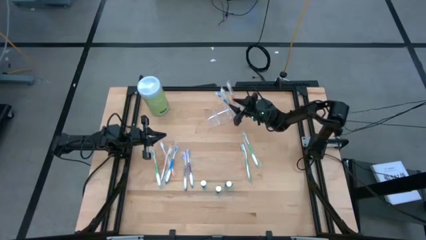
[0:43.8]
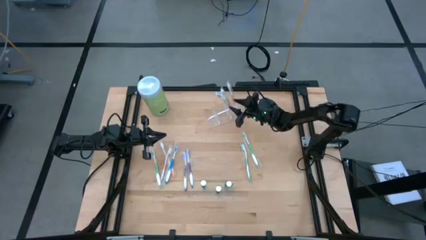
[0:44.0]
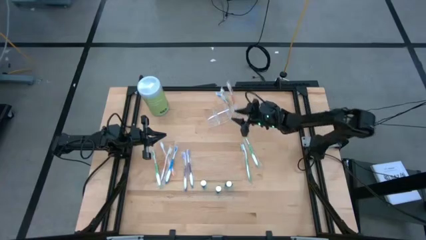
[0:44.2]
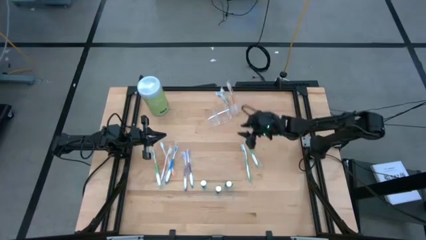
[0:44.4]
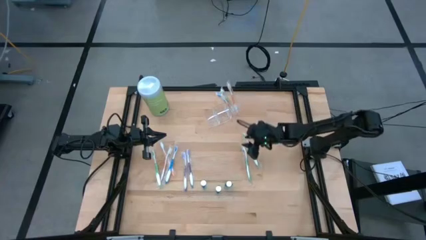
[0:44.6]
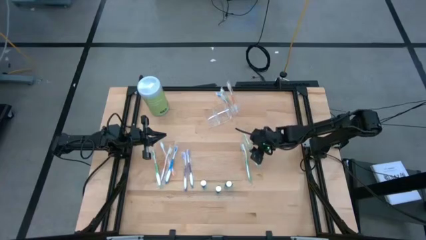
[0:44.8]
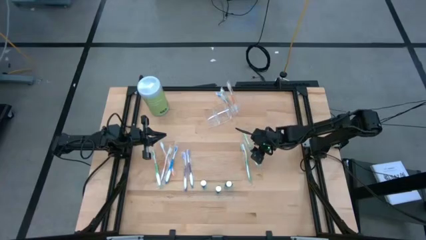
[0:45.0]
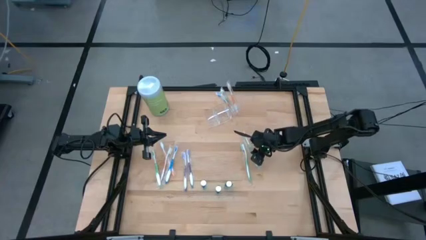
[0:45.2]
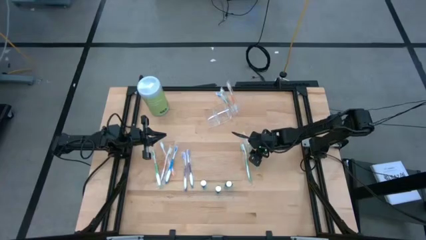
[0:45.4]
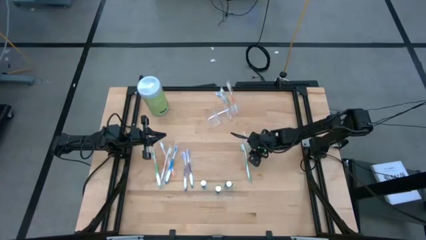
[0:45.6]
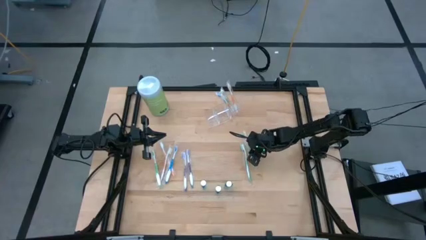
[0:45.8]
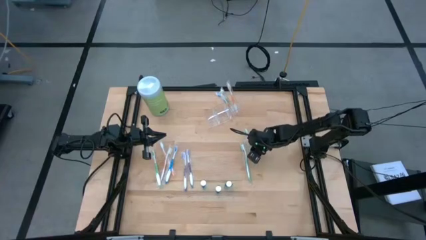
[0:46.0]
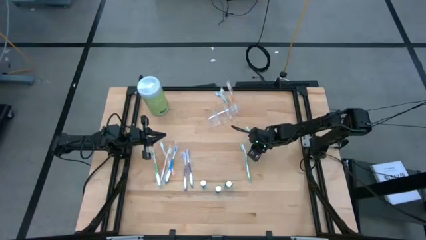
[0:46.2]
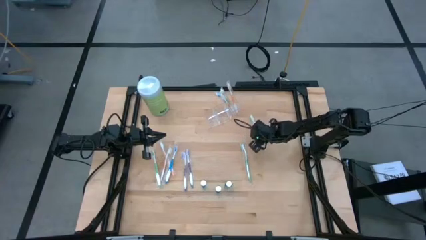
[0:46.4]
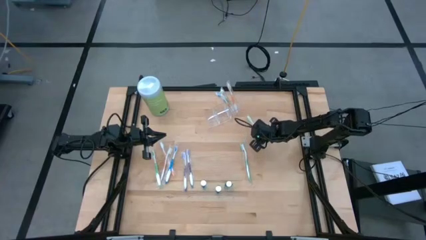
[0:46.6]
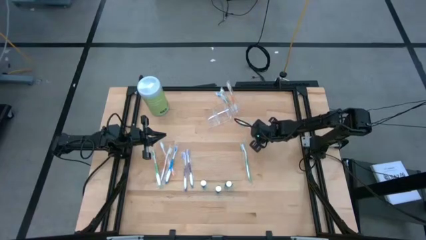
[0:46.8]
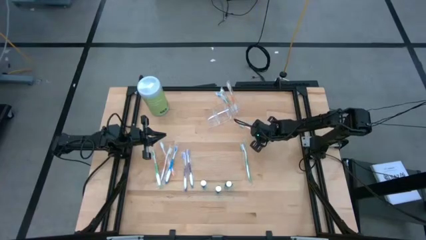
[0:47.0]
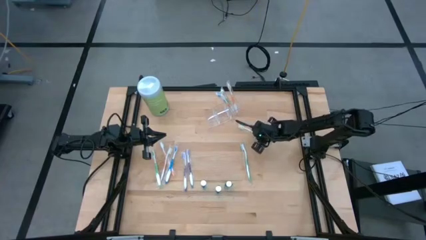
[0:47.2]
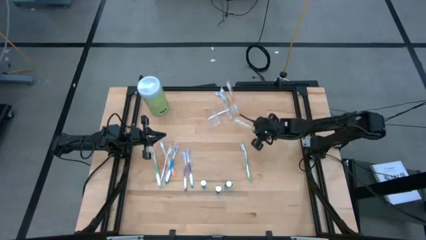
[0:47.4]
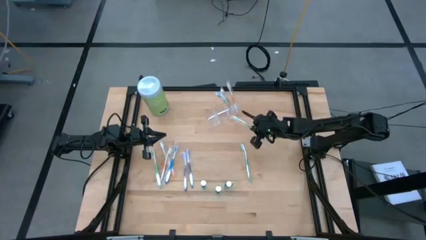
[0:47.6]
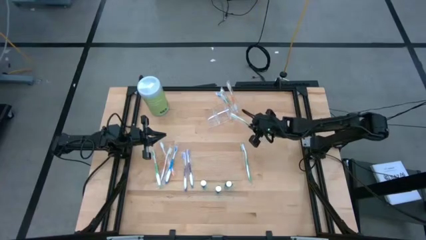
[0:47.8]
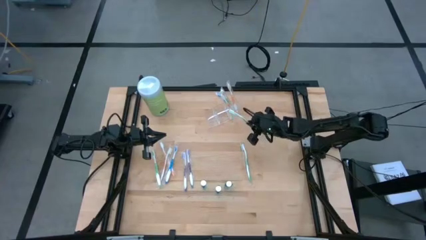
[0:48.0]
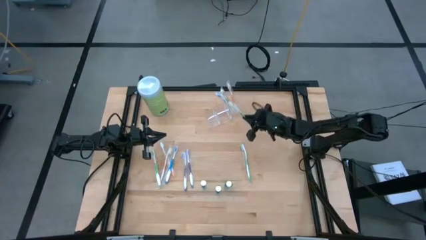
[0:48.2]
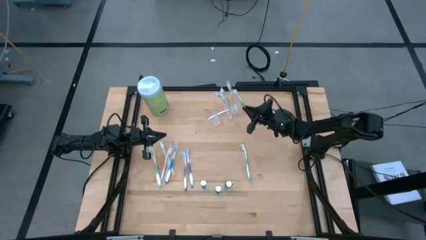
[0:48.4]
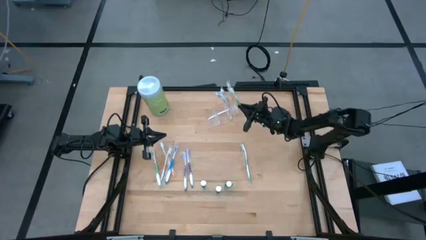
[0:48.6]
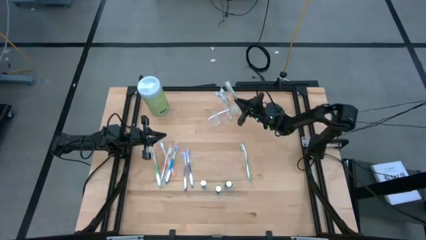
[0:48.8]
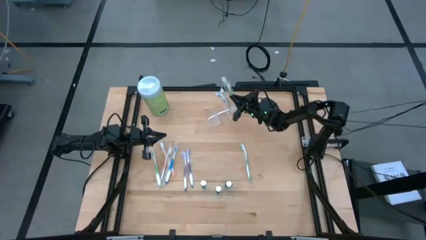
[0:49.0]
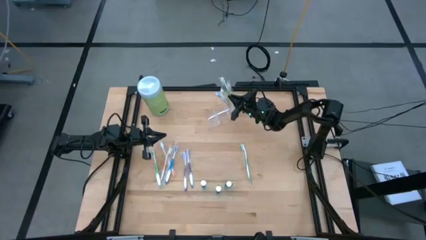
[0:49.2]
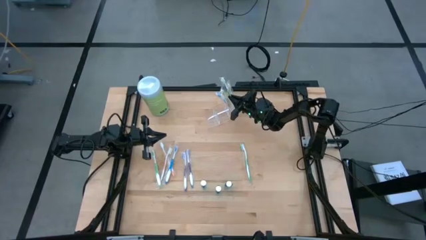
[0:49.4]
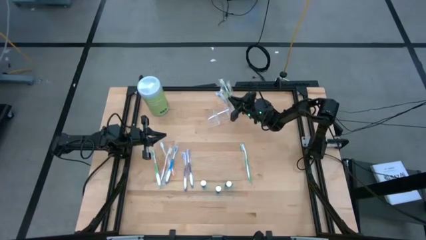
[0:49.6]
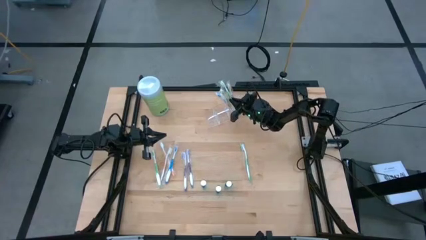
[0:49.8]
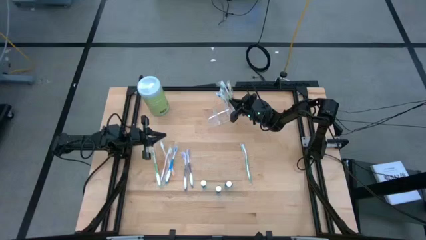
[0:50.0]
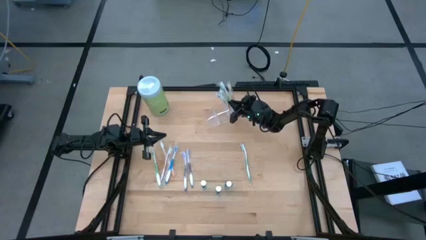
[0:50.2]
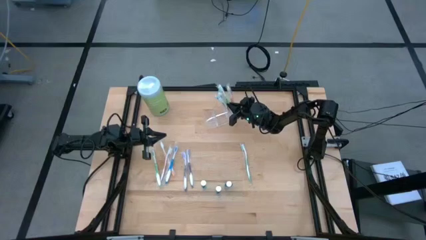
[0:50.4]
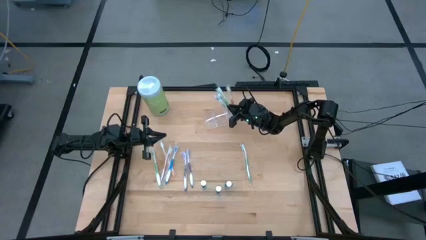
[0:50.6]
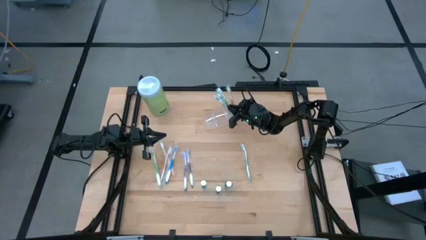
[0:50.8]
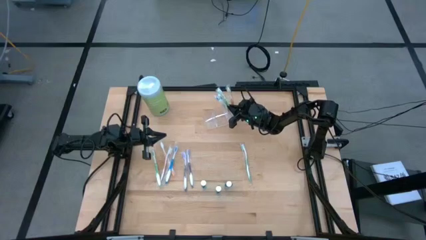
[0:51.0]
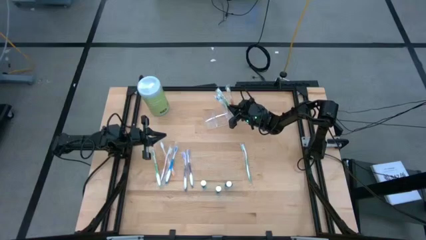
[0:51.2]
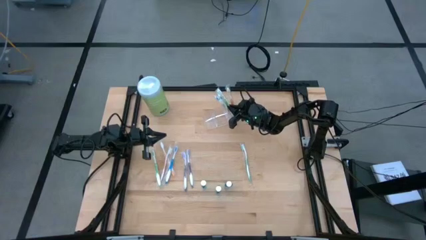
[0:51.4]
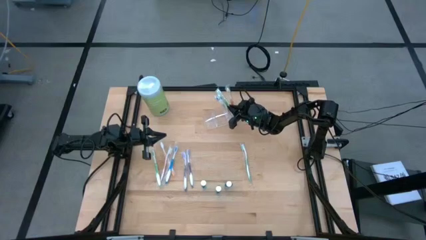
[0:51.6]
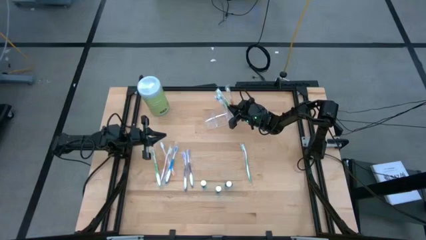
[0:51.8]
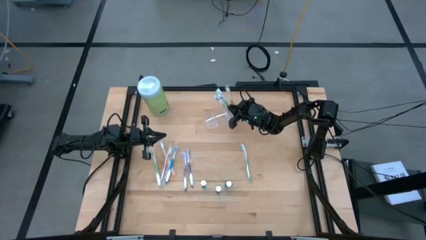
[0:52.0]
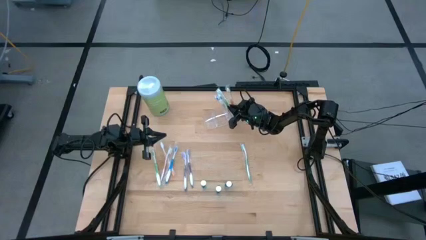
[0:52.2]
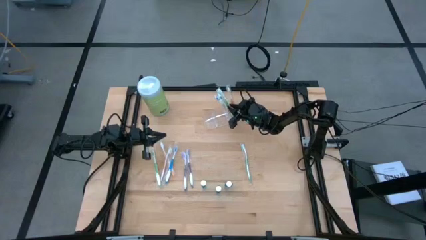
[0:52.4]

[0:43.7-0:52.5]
Task: Pick & Place toothbrushing station
Put the green toothbrush into the transparent organizer

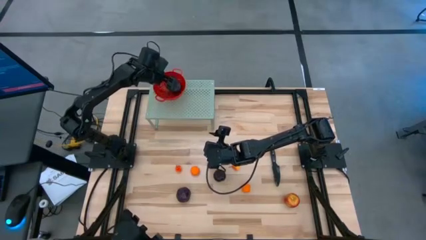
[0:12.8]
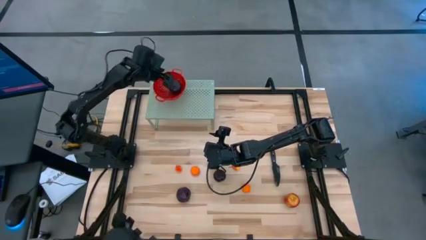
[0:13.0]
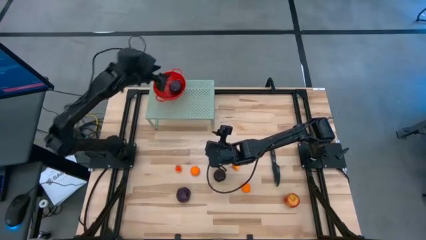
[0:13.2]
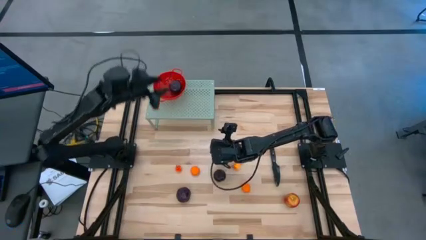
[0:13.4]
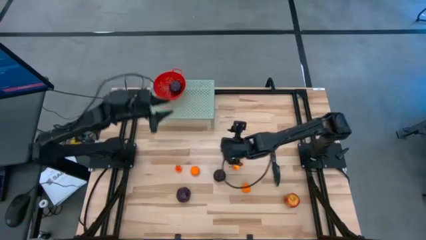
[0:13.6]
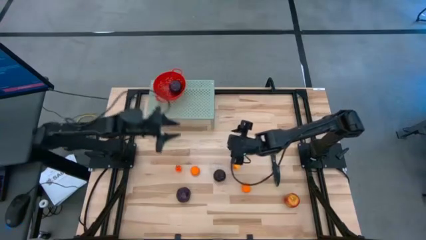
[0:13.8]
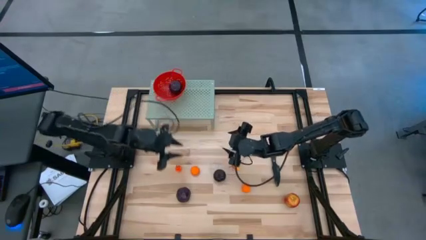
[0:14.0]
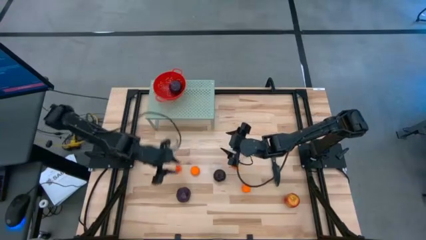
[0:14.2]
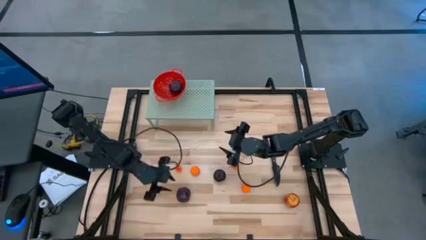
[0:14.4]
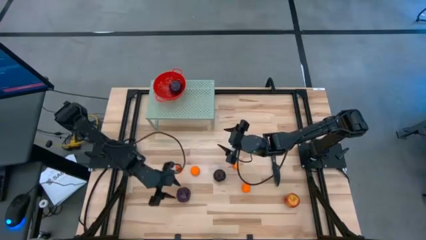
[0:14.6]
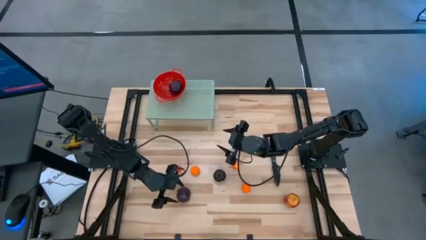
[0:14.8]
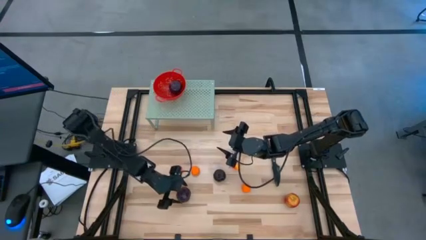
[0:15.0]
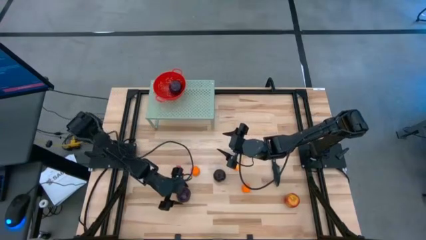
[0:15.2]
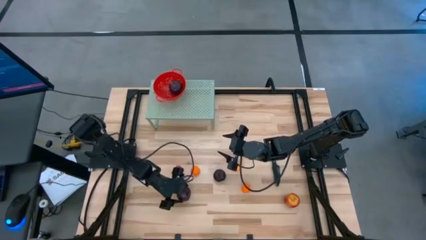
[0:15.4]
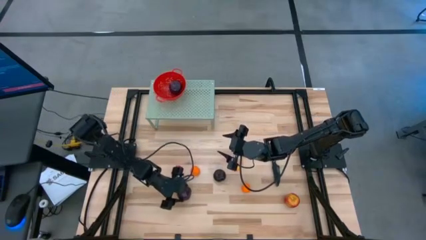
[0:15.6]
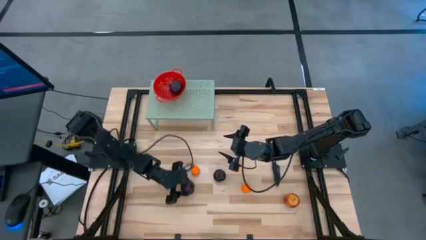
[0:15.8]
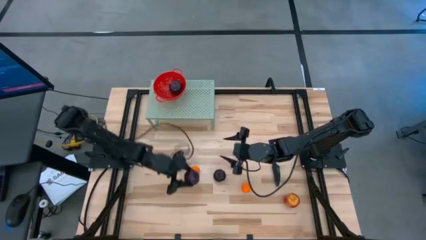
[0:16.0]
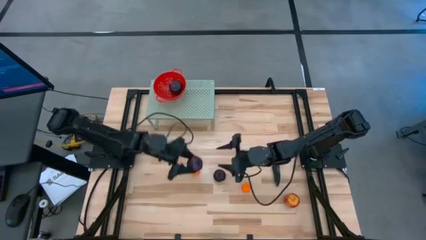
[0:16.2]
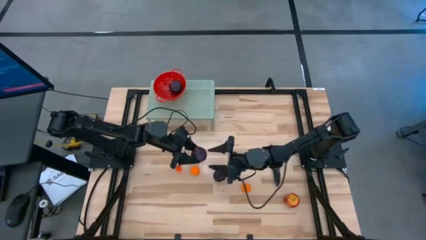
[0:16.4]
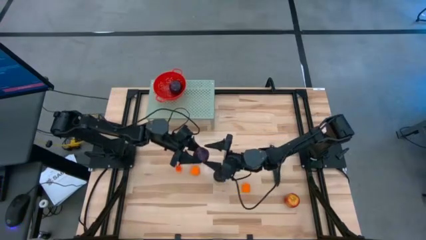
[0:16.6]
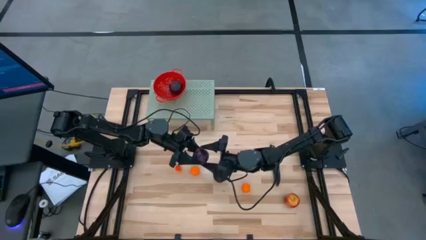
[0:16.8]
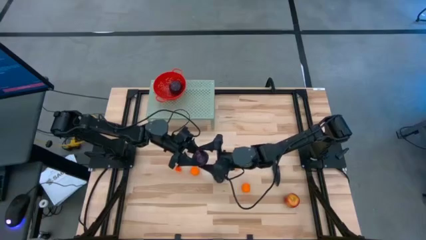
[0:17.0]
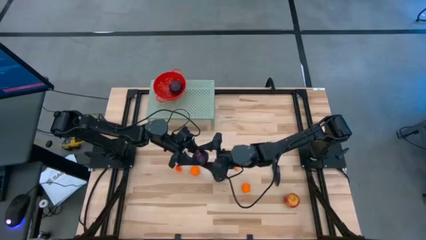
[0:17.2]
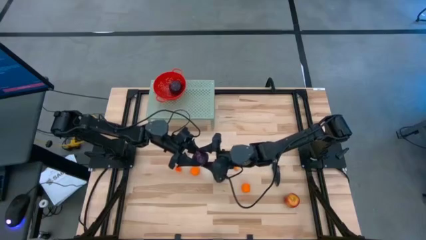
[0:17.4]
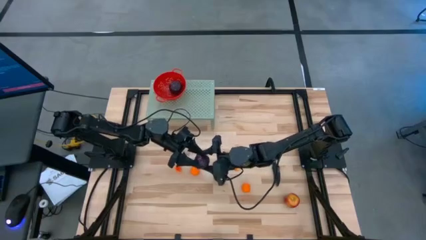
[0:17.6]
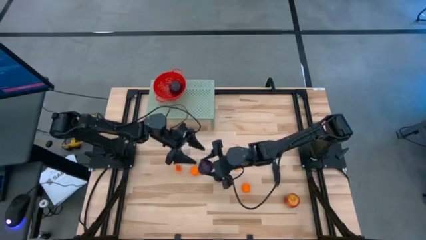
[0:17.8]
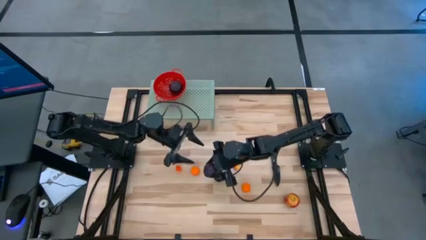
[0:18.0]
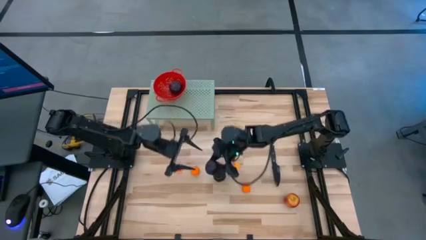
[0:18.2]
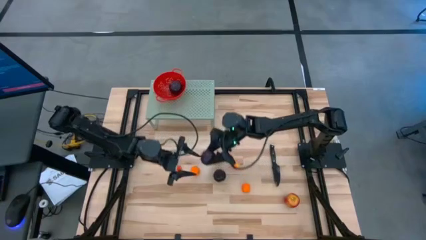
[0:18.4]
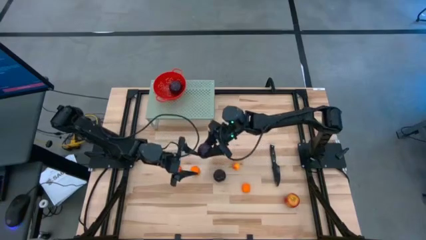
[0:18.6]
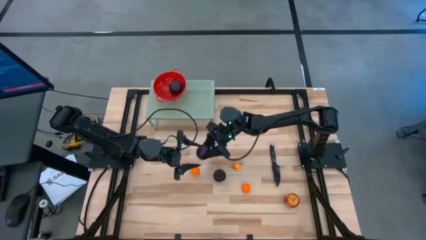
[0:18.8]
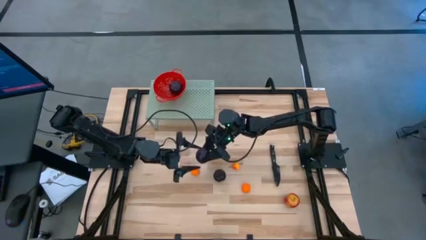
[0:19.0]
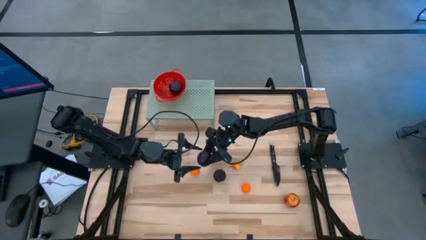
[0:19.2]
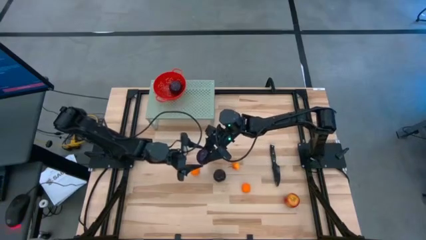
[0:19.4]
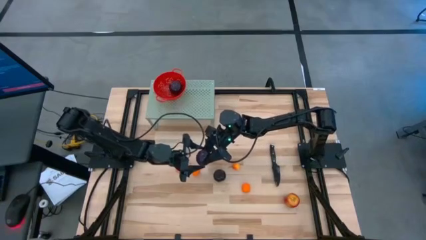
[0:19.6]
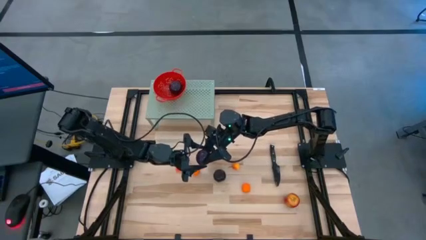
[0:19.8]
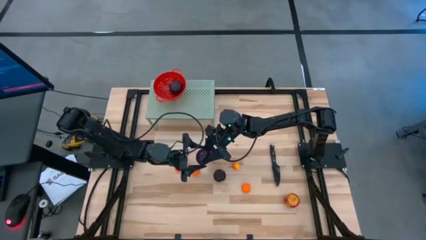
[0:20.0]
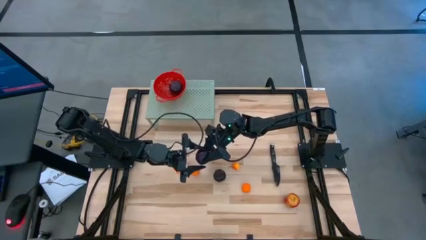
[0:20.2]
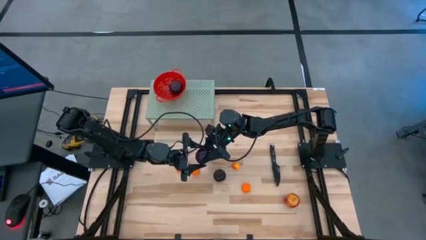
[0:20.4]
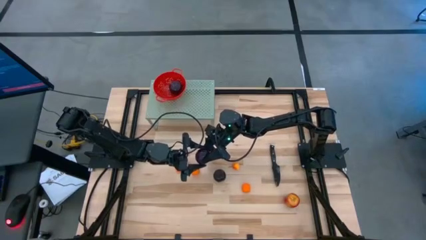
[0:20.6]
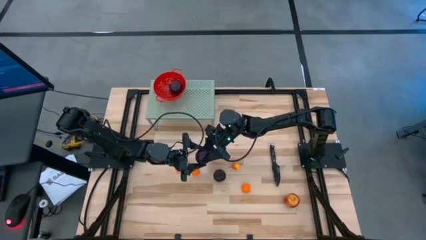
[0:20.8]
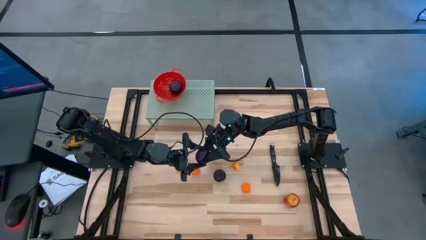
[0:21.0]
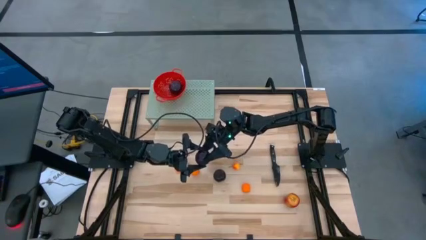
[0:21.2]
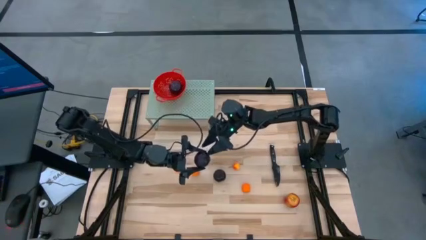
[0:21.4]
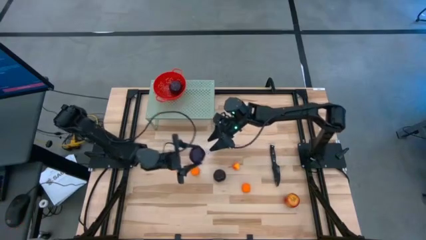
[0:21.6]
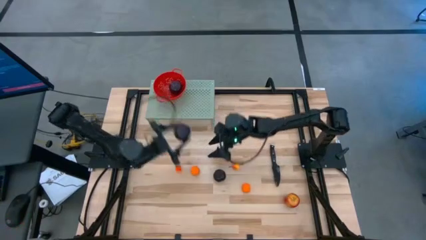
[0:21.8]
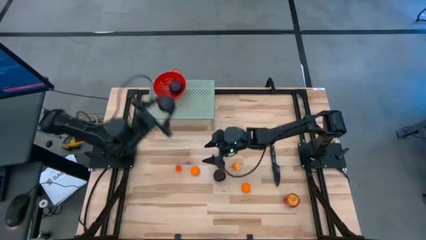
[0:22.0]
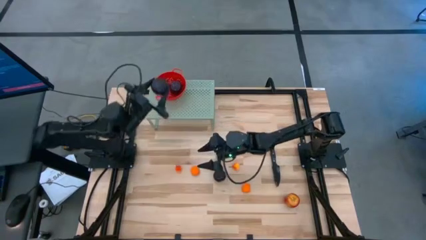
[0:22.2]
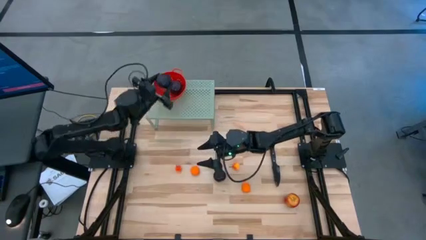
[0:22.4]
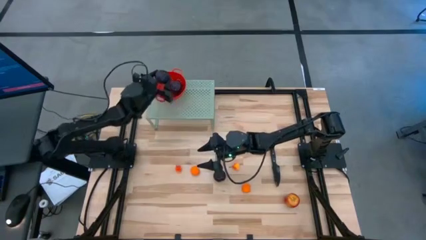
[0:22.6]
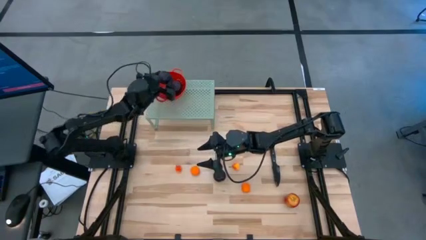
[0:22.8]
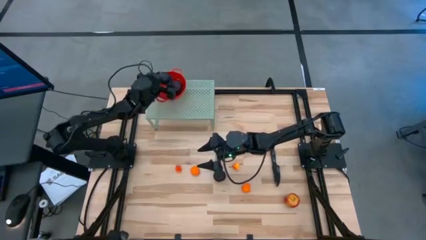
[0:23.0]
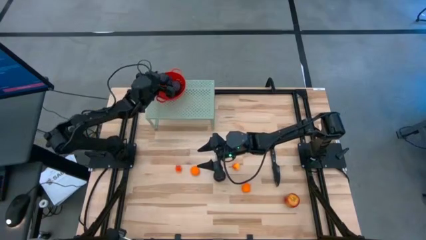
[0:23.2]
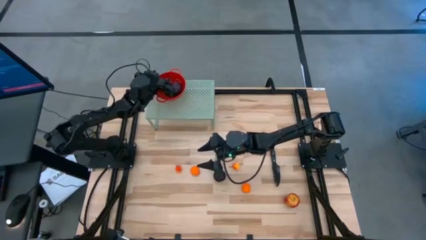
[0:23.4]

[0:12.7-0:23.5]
Task: Pick & Place Fruit
Put the left purple plum into the red strainer bowl
